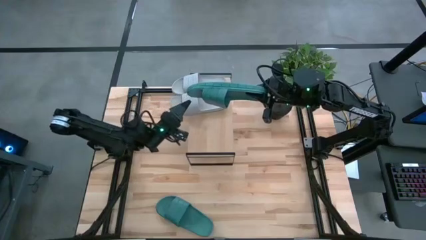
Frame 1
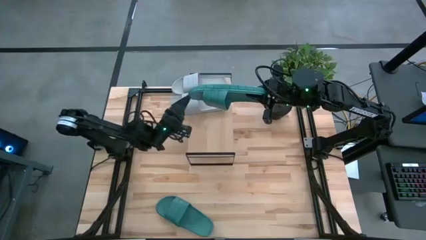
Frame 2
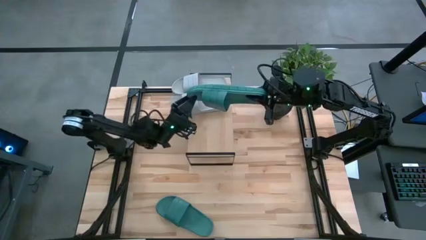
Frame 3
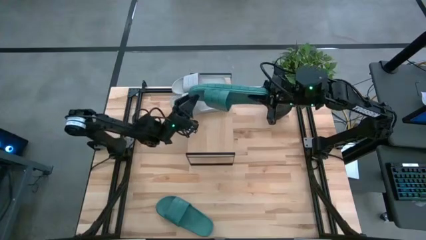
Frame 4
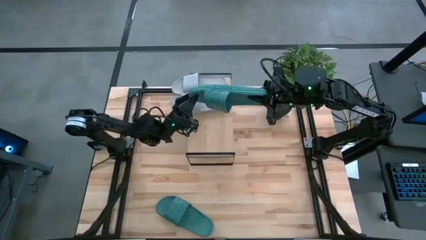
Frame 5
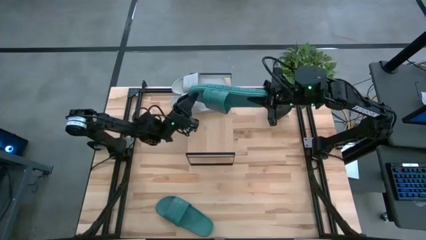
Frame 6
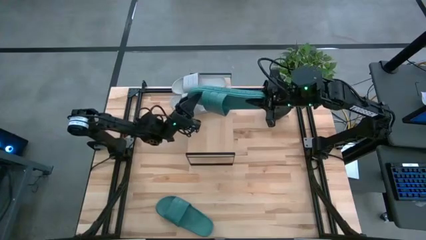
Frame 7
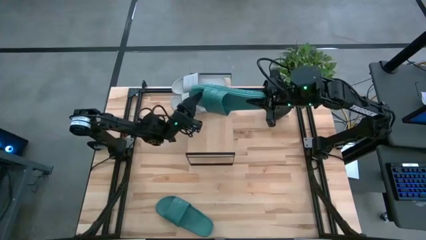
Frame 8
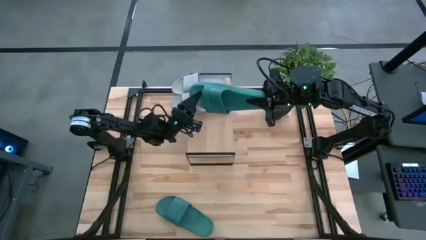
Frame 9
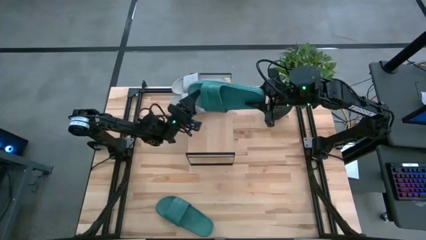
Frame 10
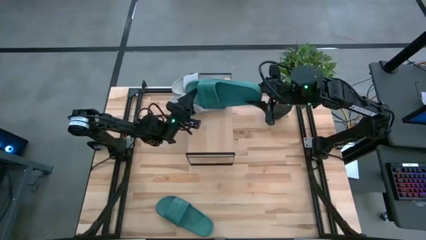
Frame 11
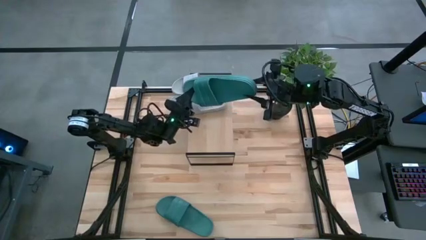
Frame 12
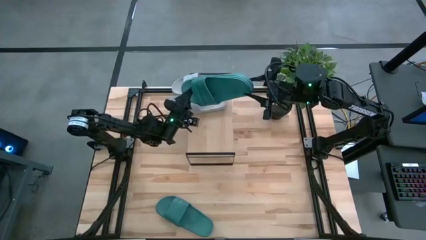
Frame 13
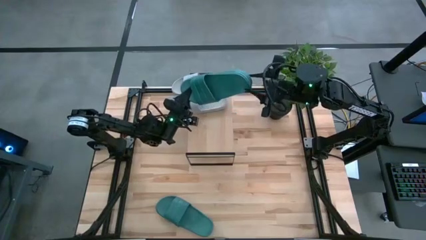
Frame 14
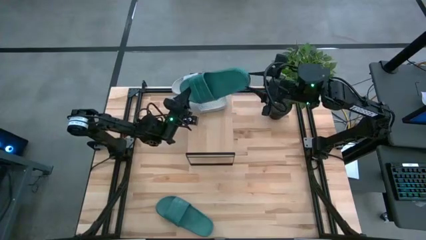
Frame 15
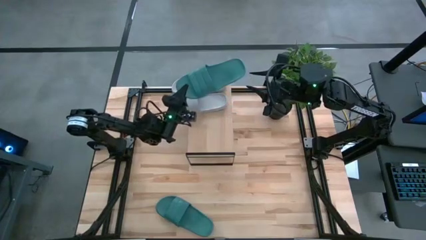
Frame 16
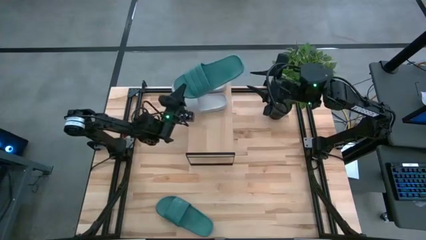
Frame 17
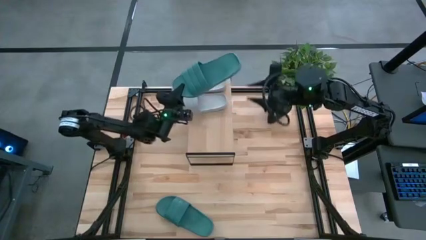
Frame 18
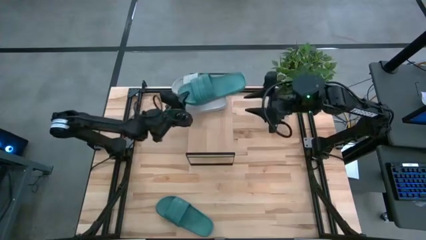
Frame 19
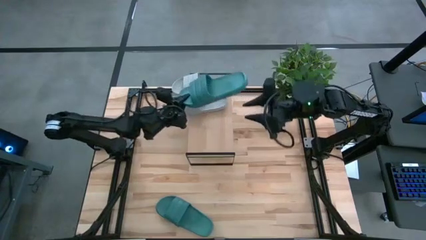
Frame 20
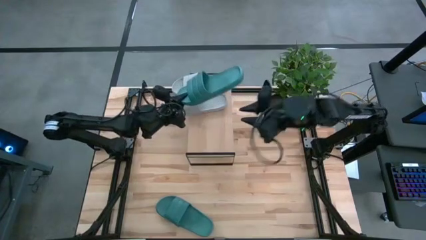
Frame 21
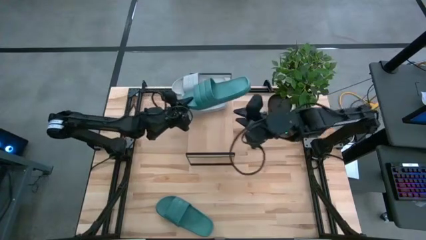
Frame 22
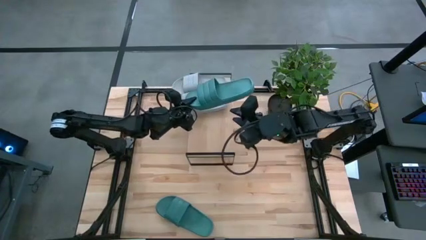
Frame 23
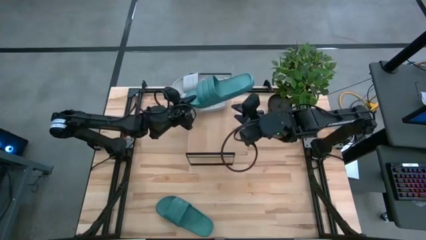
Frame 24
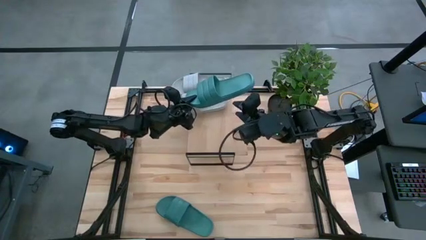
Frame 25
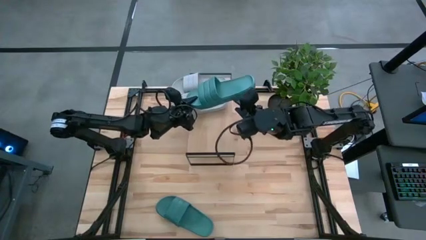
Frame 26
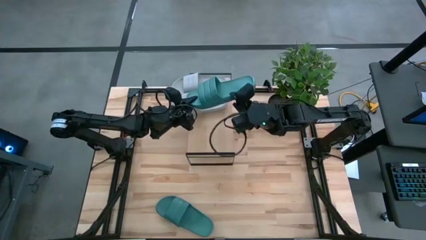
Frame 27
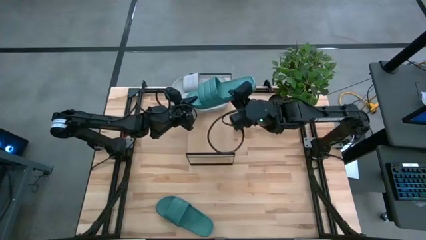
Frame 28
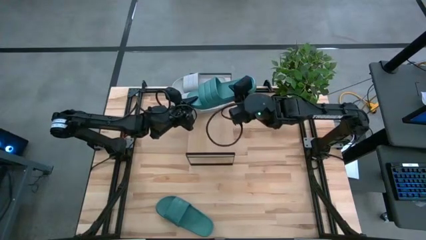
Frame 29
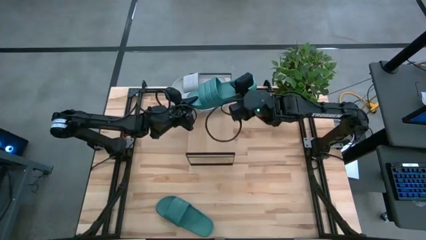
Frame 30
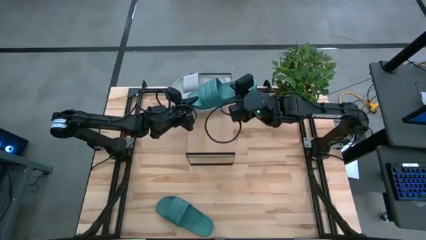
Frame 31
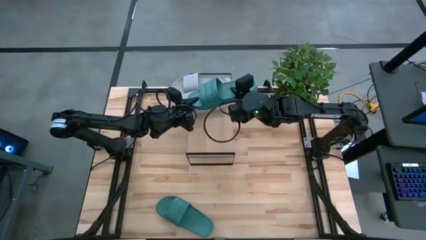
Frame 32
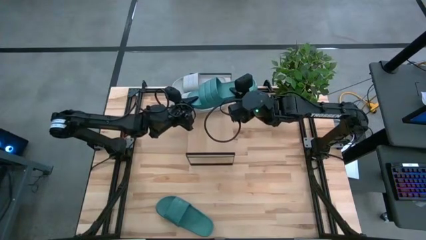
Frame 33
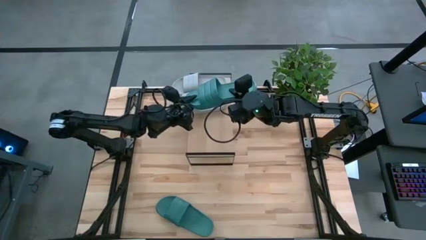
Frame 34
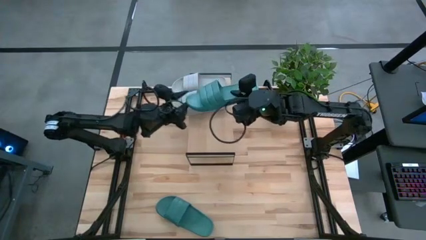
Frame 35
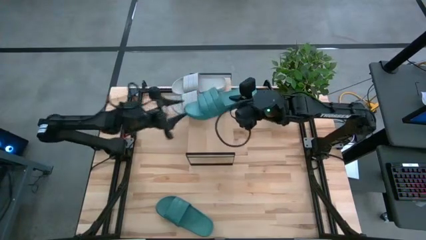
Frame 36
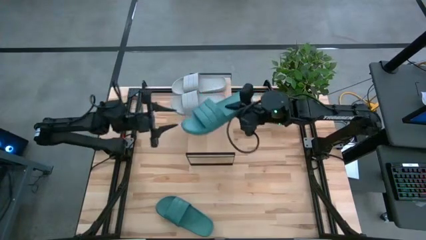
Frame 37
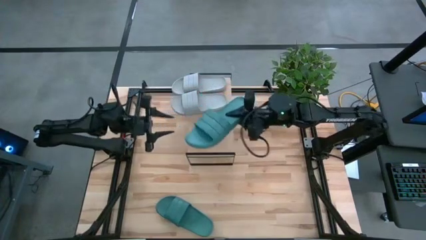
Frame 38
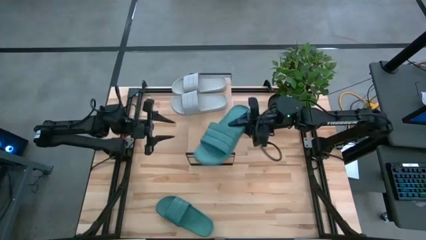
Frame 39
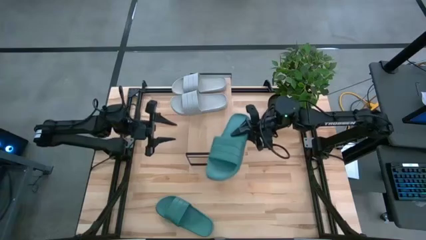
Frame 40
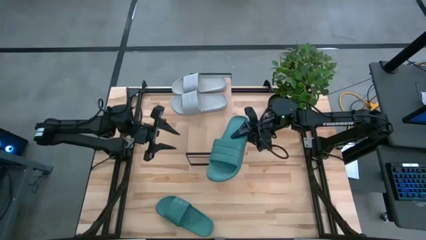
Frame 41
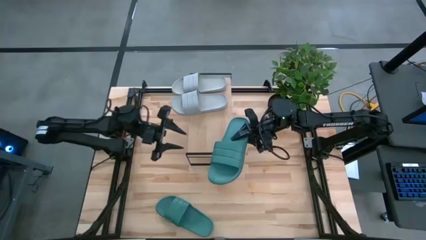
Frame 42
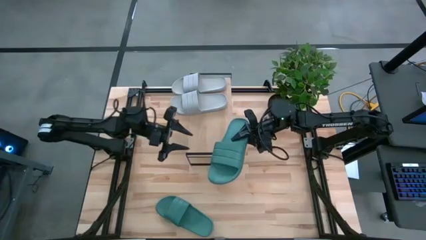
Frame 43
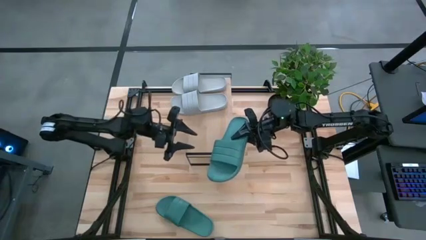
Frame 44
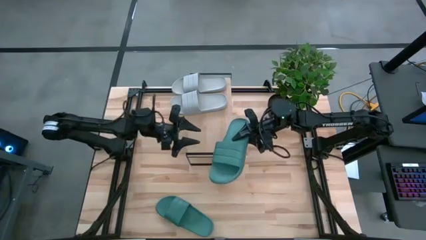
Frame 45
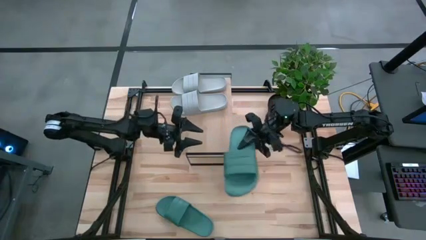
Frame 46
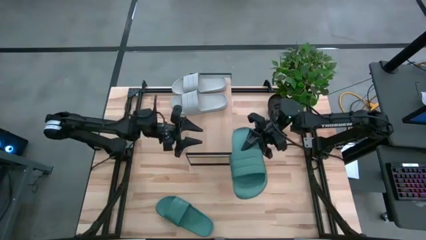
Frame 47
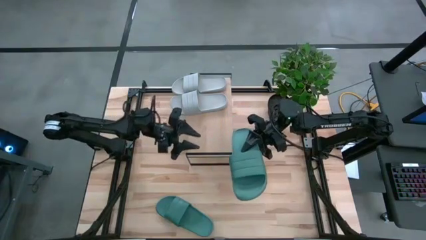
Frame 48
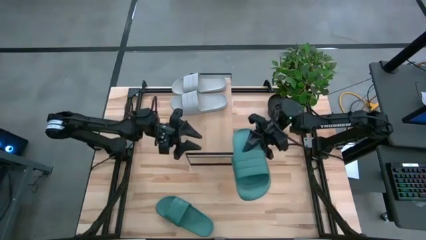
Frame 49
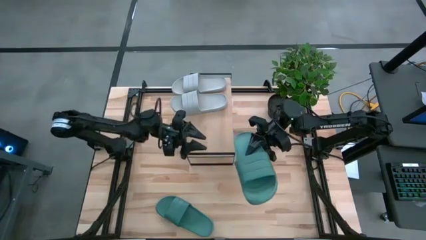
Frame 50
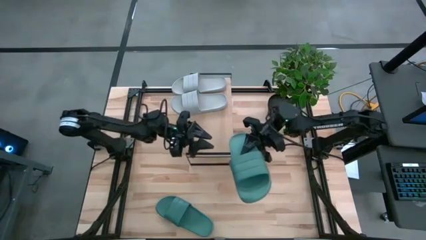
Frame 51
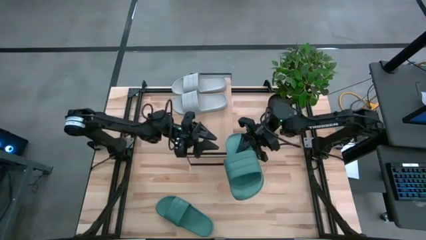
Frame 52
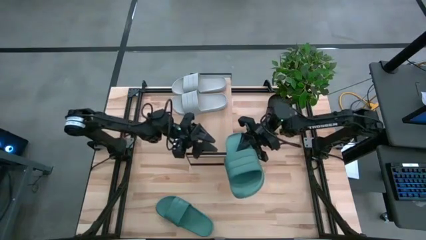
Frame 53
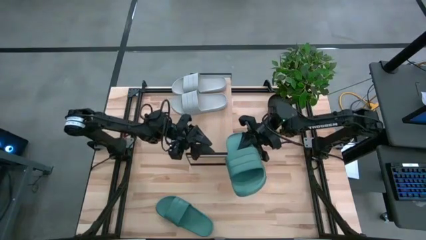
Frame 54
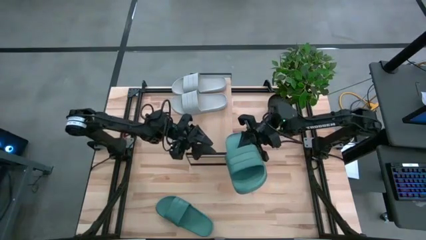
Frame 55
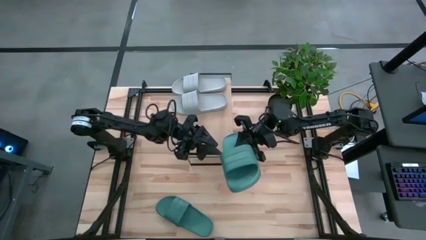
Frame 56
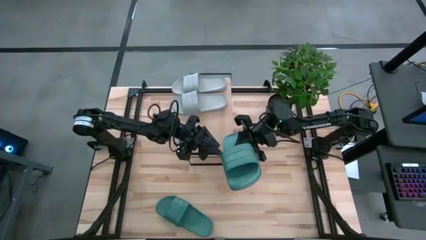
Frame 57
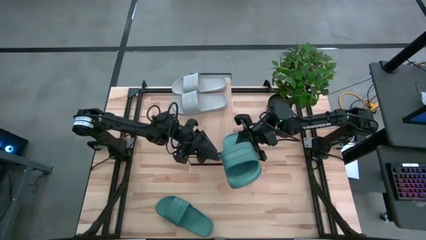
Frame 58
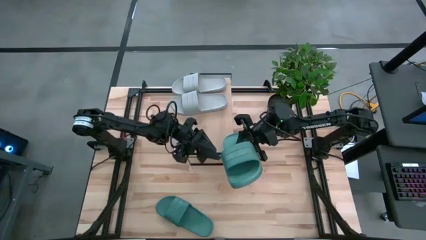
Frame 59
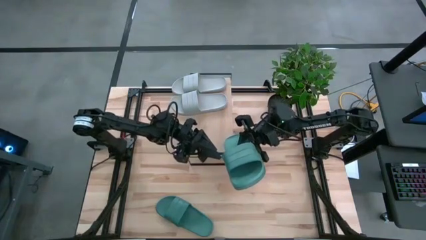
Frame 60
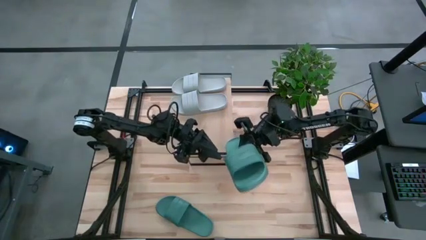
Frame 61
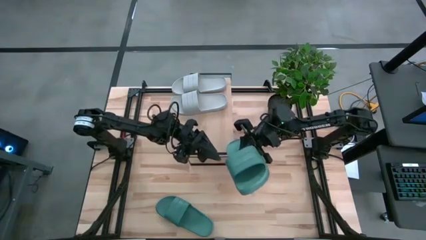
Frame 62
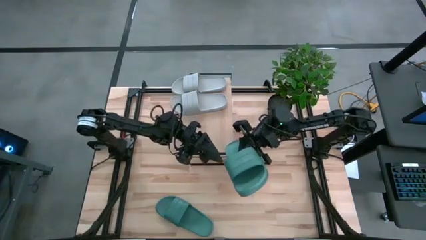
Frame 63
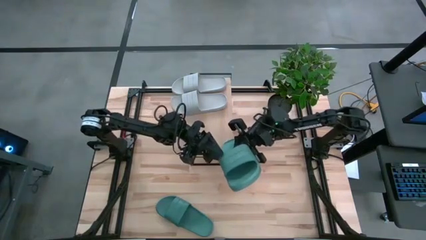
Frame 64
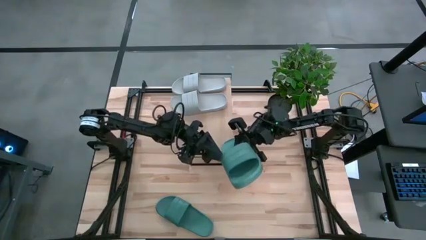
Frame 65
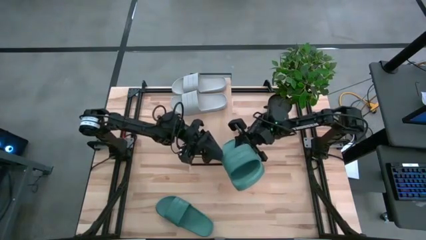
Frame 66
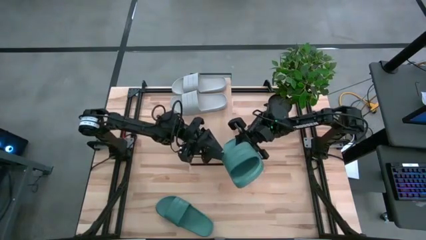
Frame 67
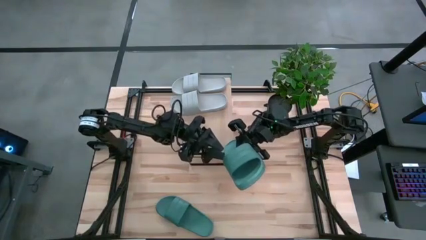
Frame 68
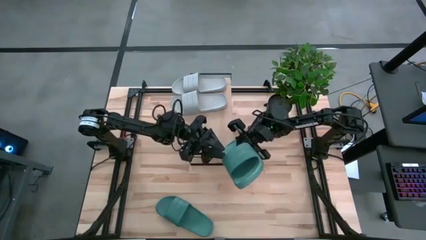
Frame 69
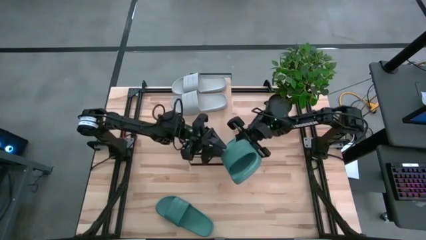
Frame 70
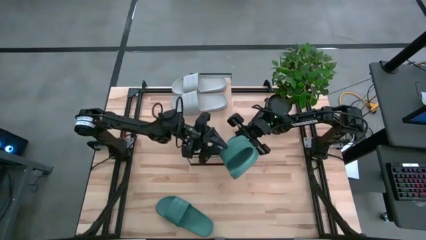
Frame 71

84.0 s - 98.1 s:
Task: Pick and place slides into the shelf
Put the left blue slide on the shelf

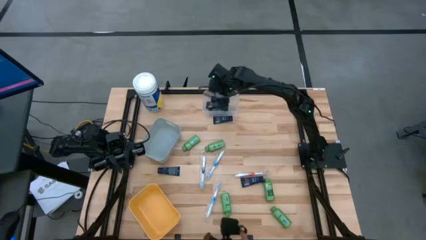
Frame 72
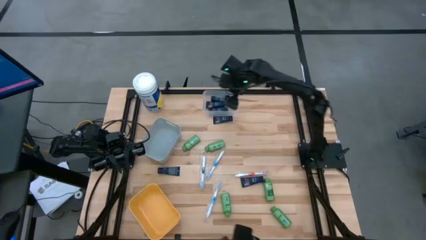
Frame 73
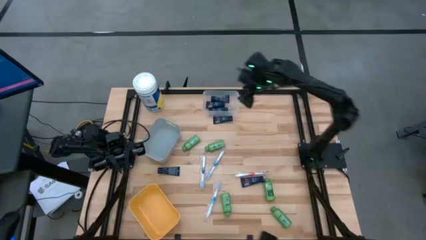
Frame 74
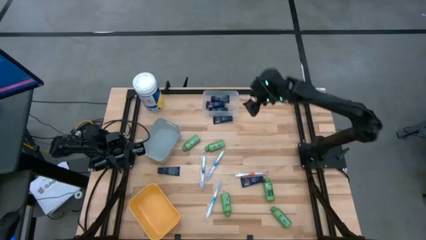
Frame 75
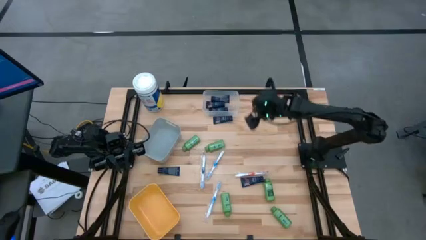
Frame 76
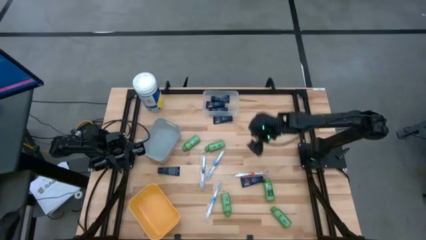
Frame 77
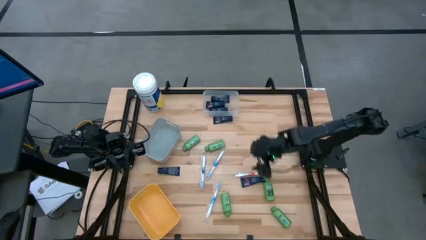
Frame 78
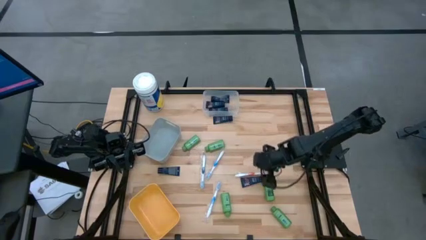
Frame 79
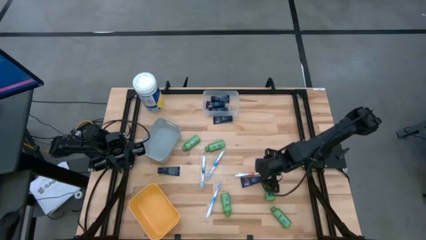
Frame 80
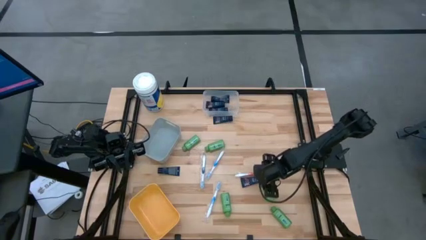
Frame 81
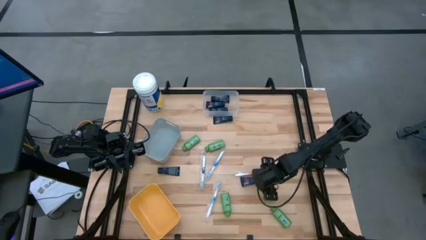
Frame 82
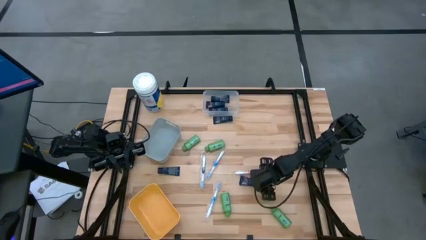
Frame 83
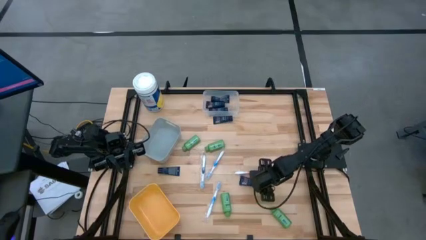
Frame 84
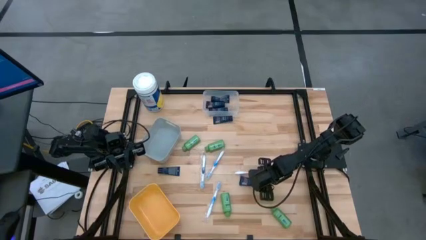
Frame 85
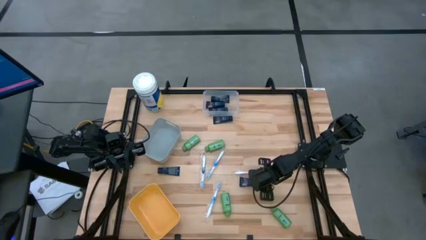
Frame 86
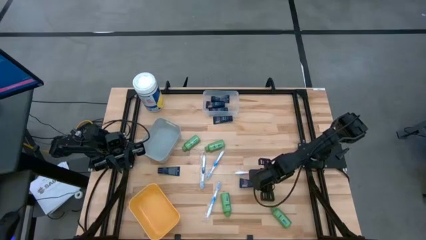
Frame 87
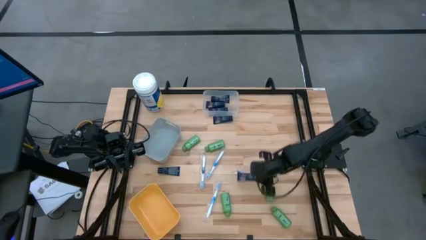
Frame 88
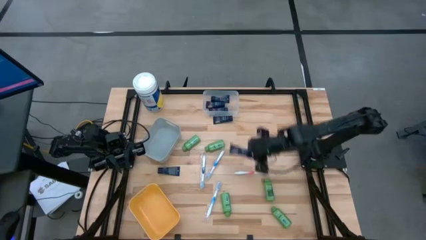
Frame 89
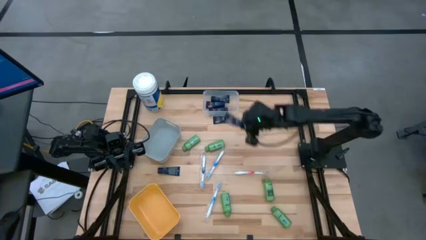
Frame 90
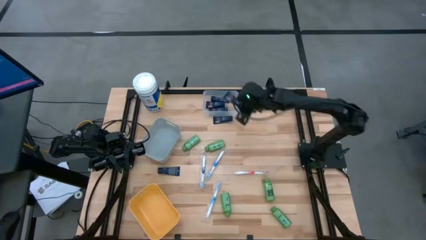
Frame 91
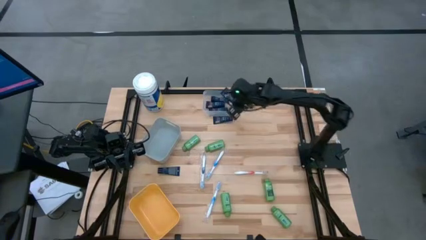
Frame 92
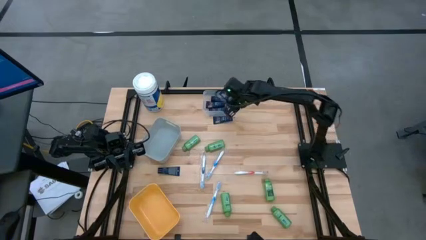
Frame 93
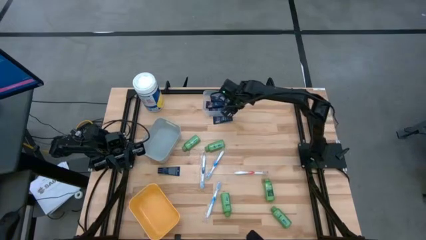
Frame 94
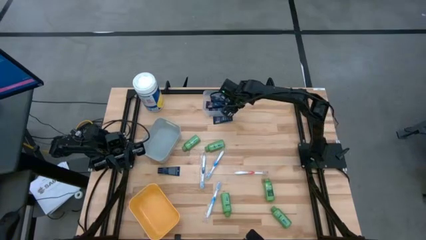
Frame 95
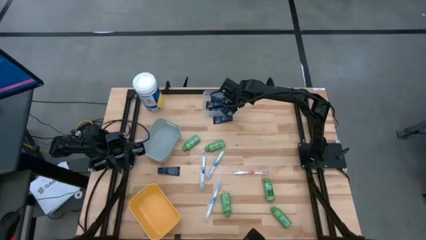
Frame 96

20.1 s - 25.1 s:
Task: Pick & Place Travel size toiletries
Put the blue shave cream into the transparent bin
